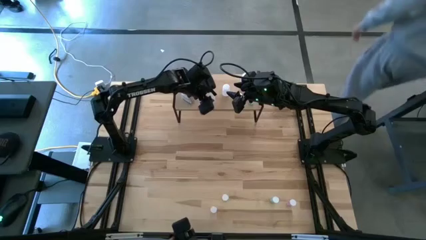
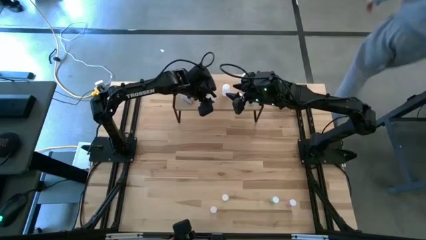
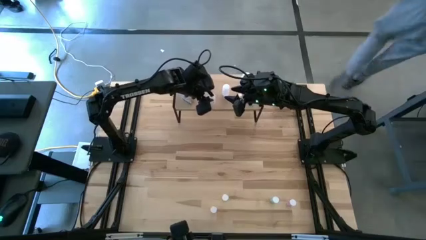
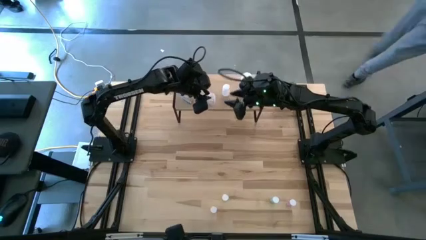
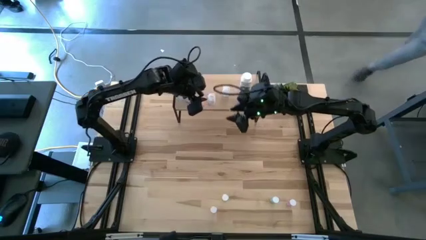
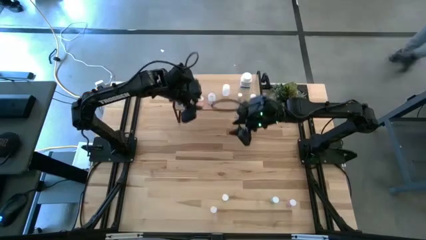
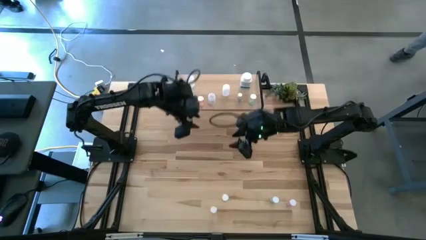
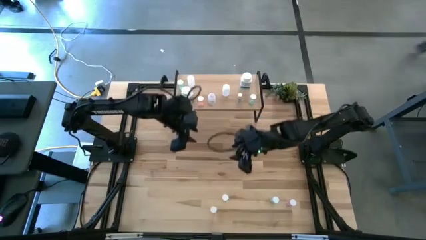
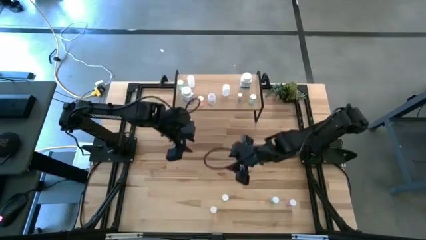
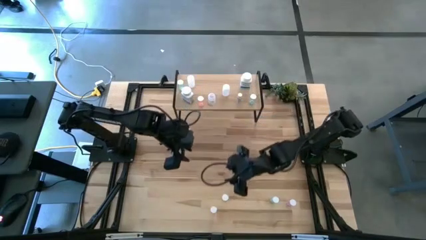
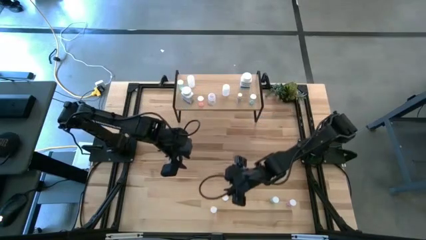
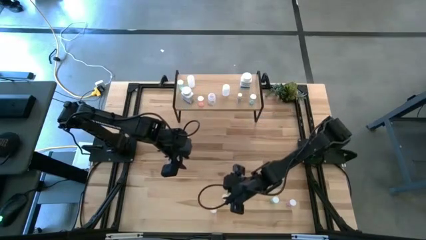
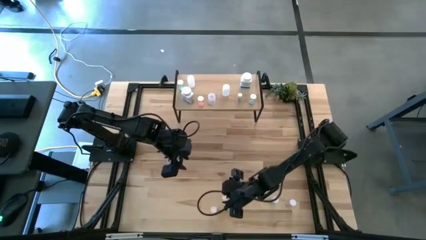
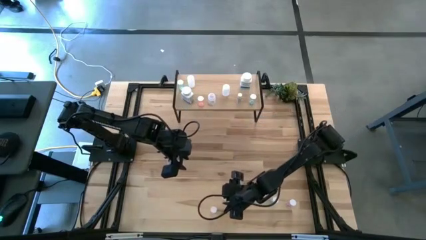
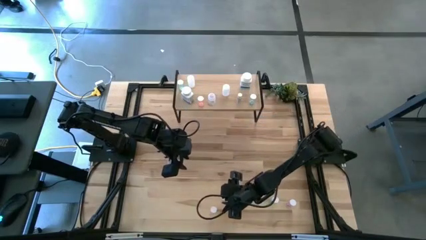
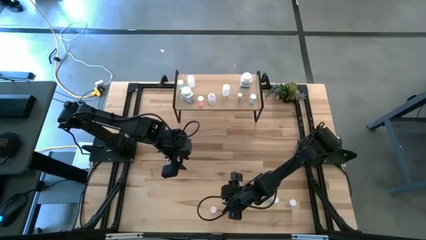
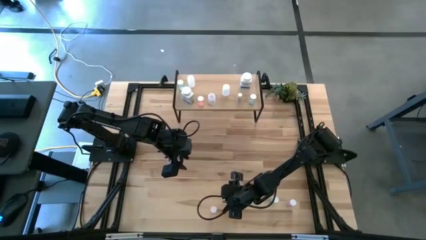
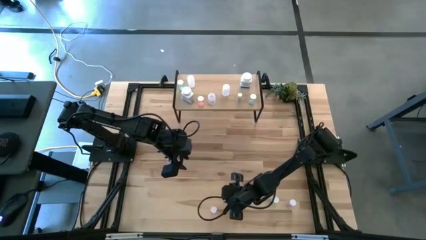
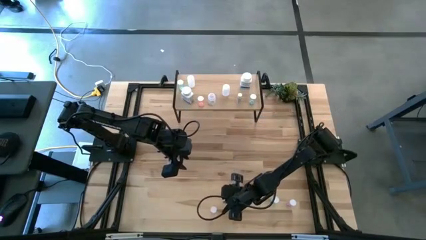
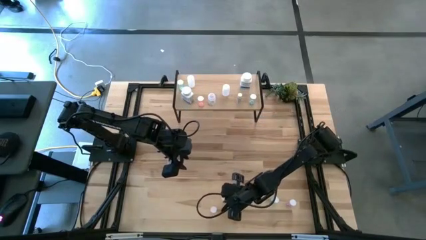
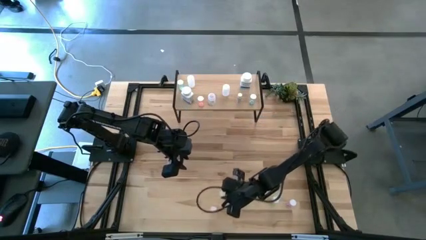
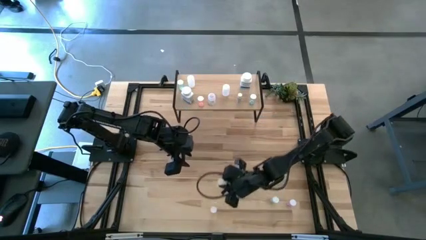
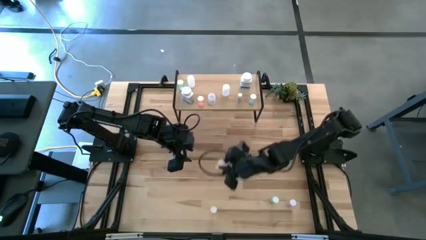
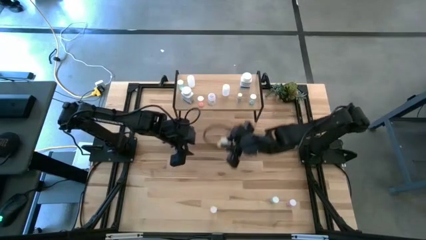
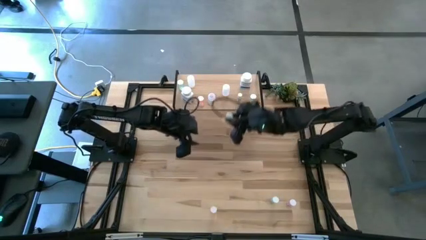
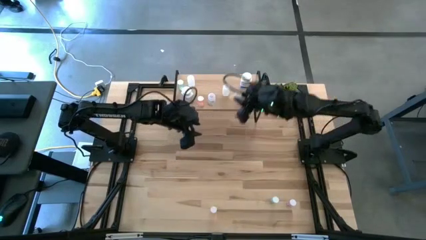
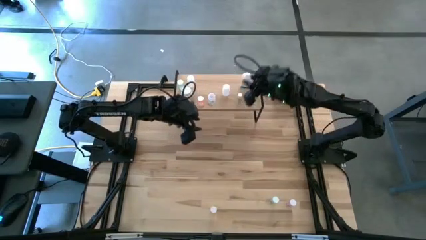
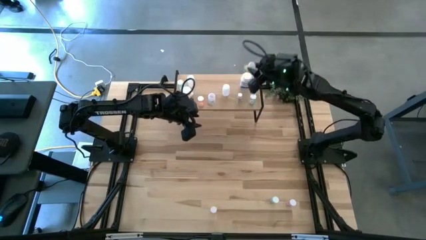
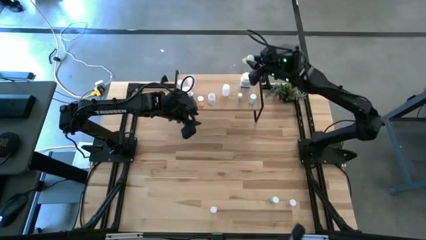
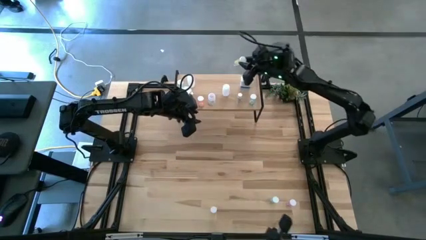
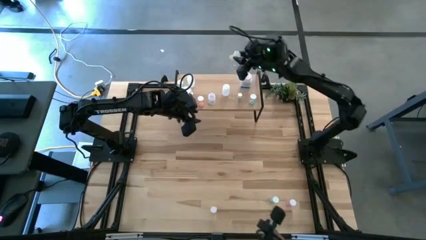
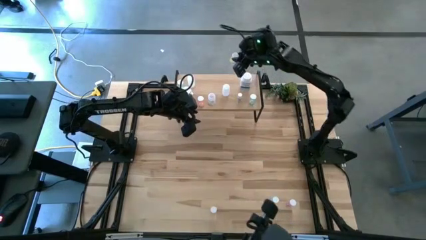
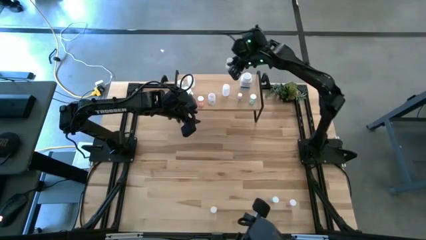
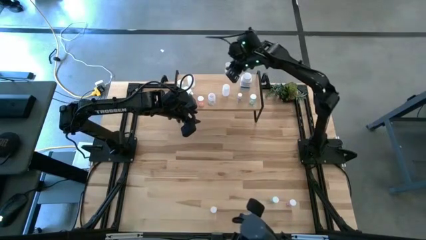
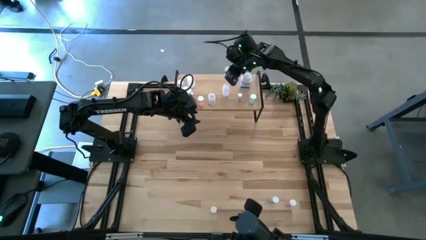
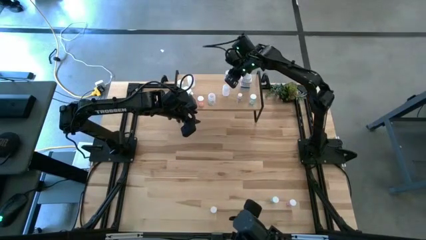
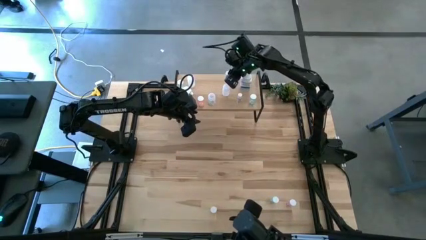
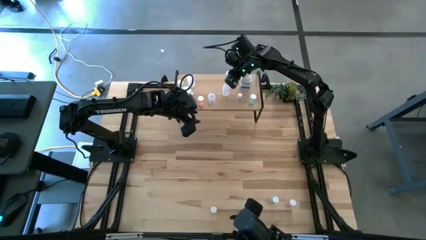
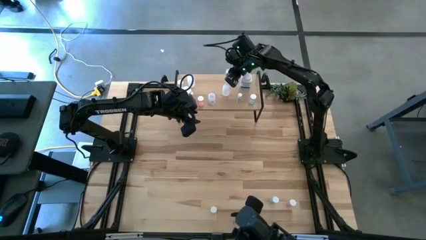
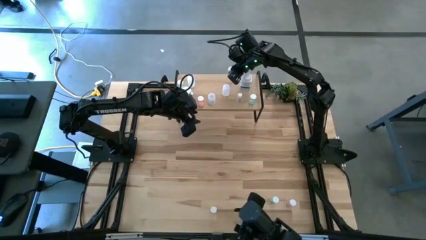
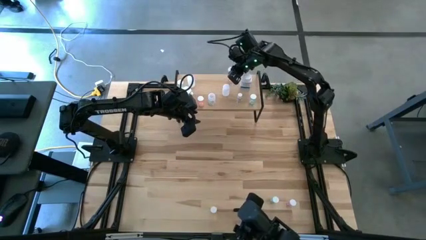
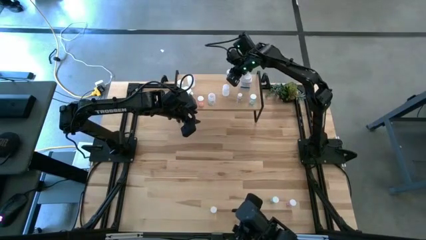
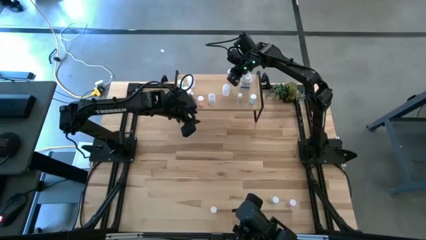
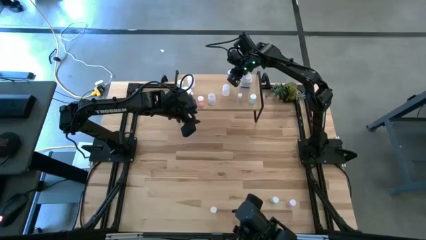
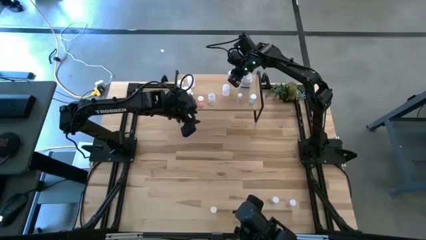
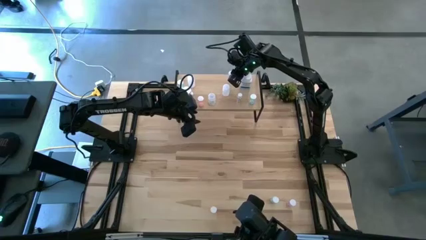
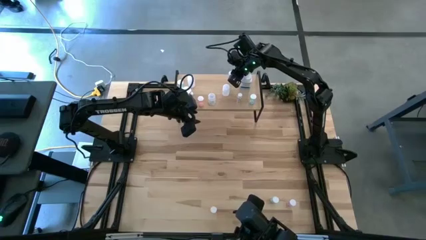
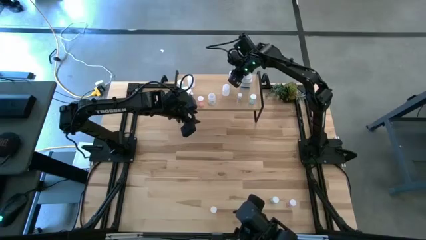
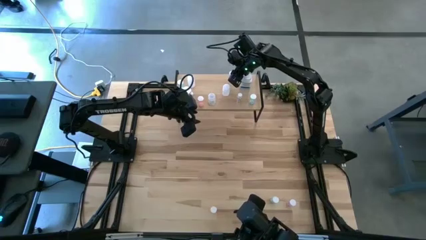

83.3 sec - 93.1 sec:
Task: Pick and place medicine bottles onto shelf by color
Put the yellow transparent pill bottle on the shelf

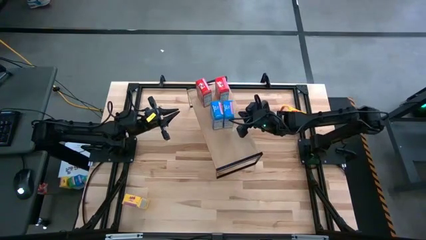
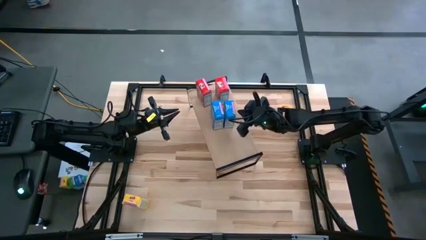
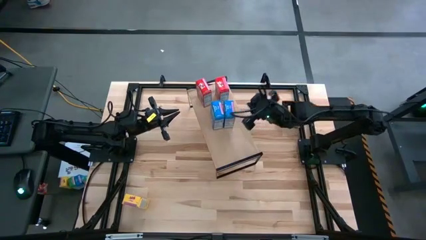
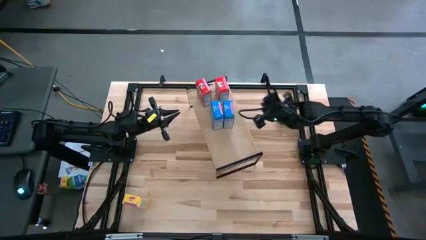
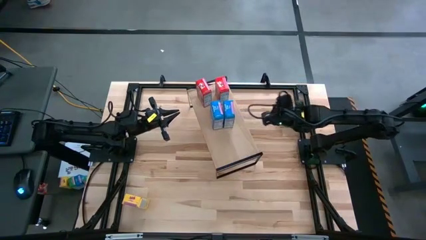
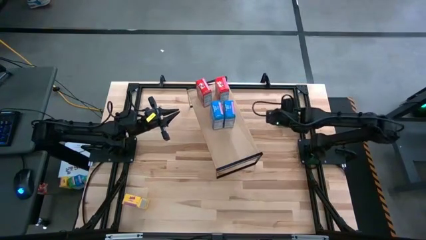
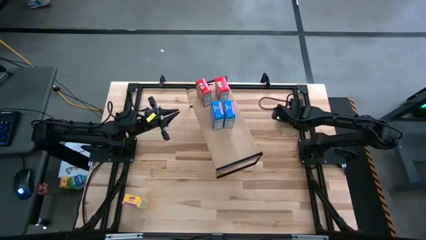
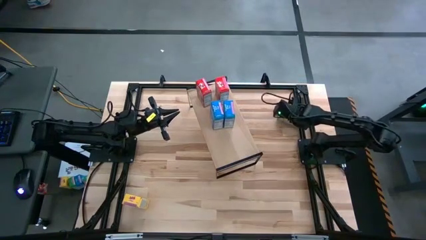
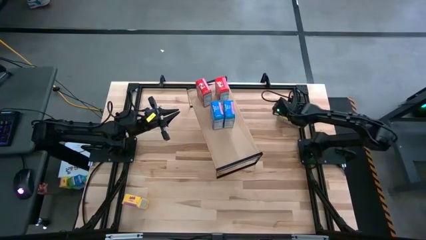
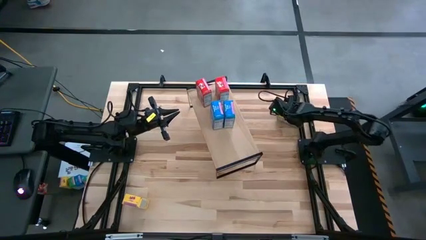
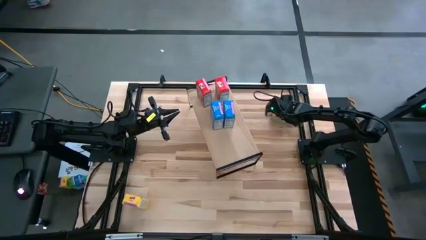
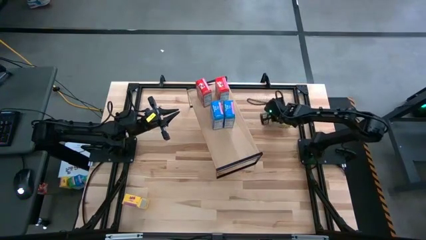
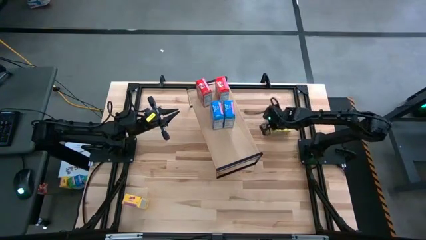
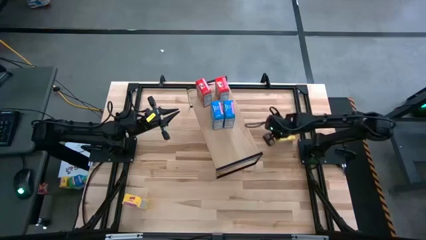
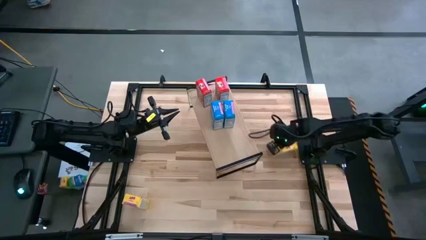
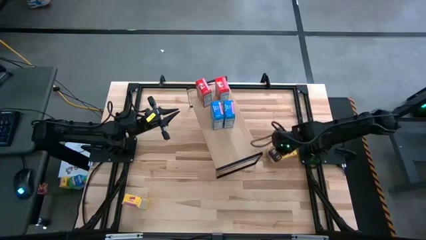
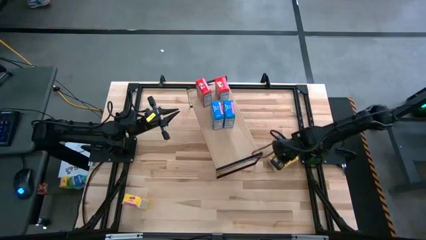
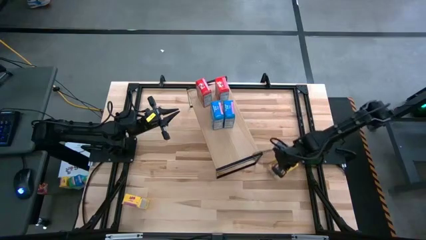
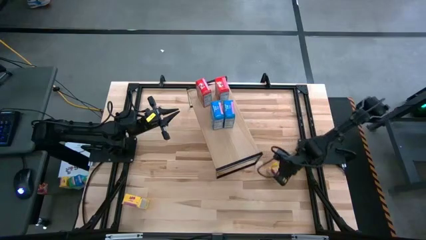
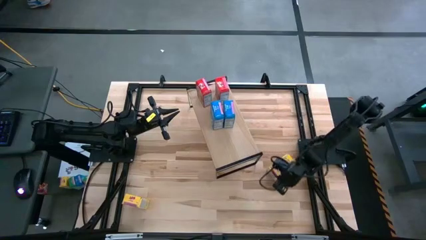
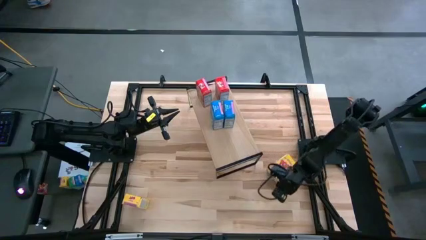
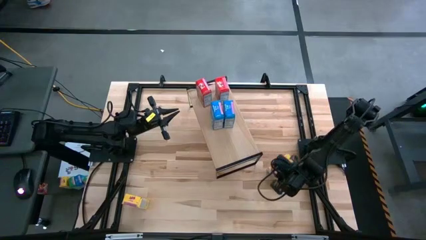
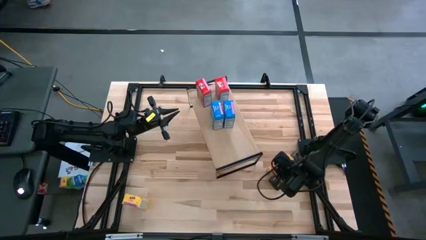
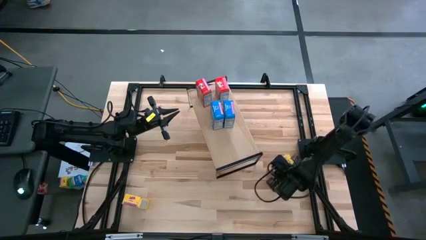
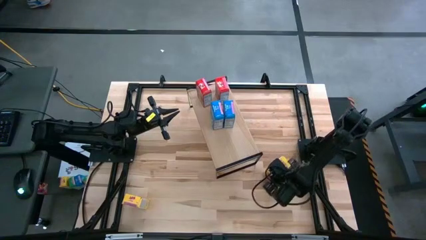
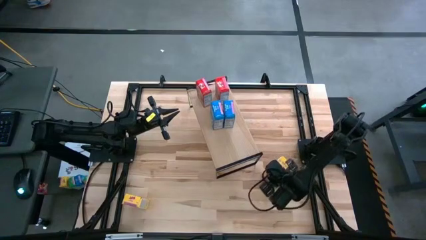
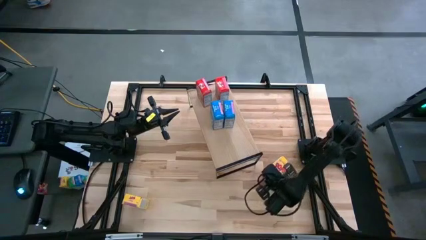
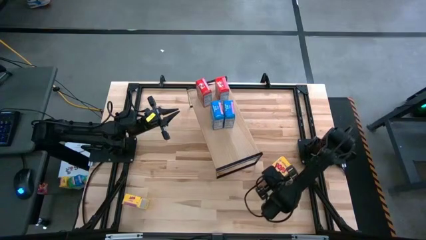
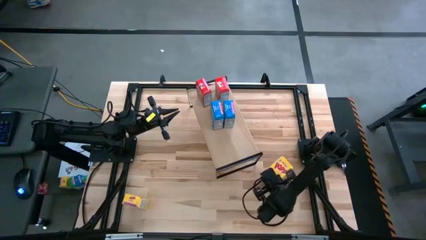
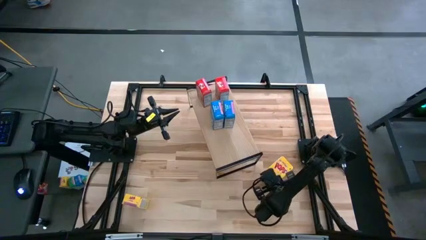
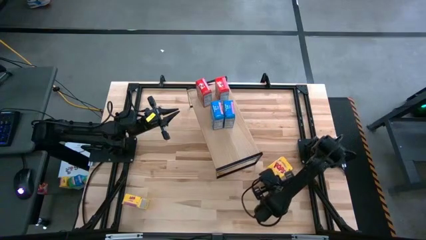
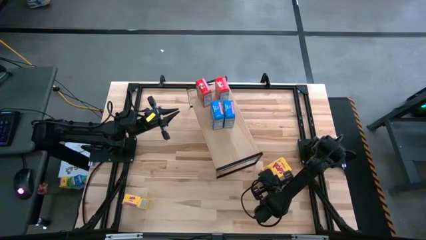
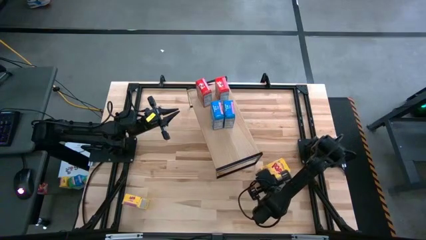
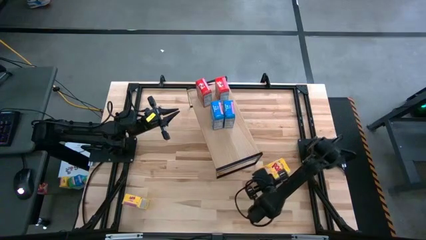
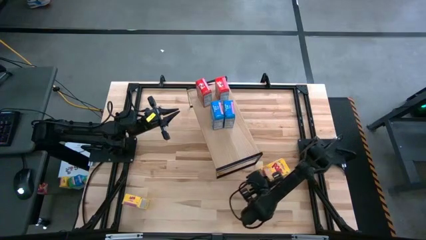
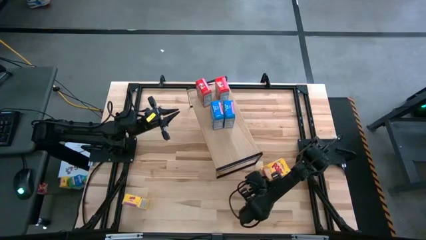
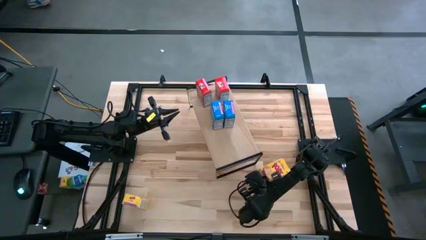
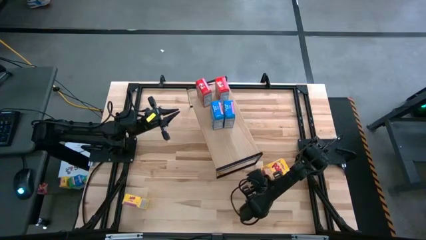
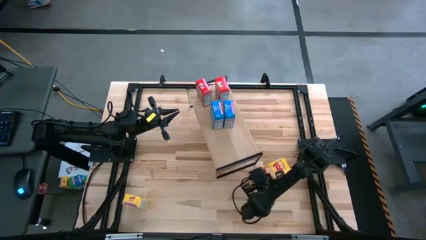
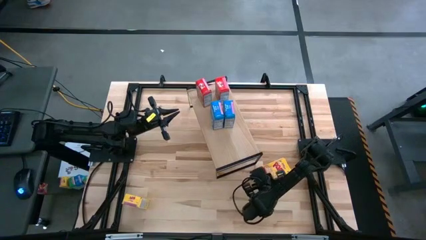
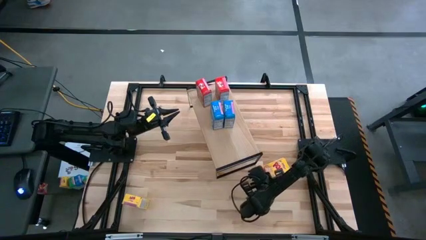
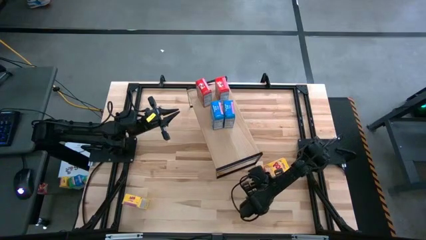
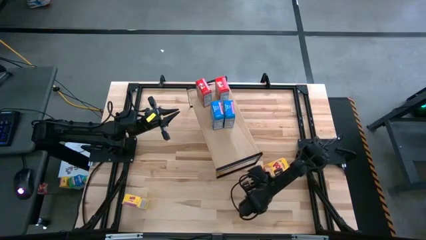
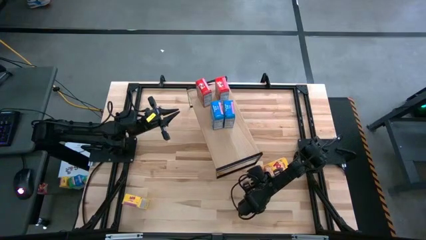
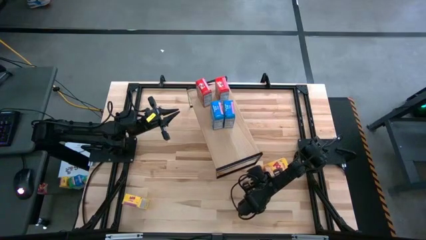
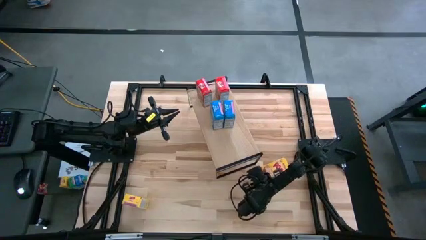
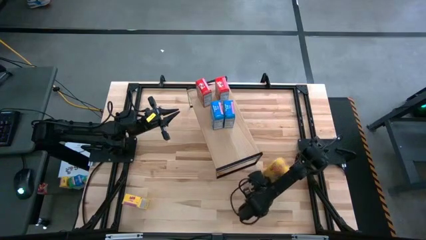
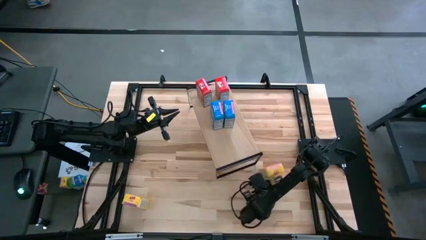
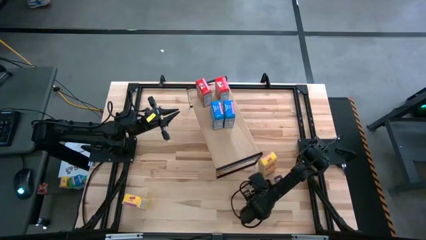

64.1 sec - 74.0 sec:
Task: Stack cereal on shelf
Put the right yellow cereal box on the shelf
